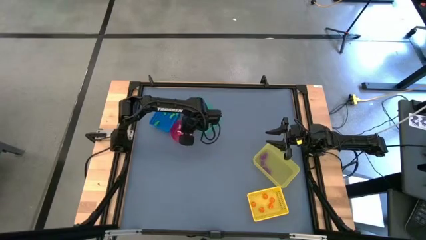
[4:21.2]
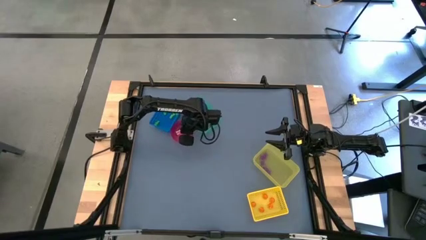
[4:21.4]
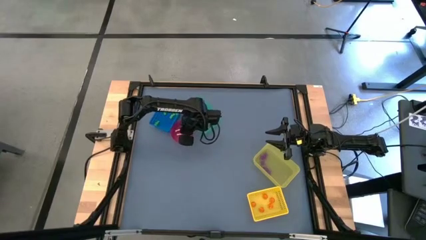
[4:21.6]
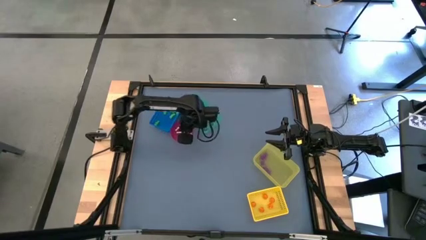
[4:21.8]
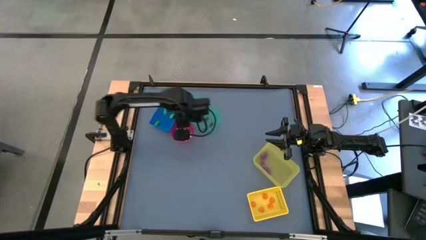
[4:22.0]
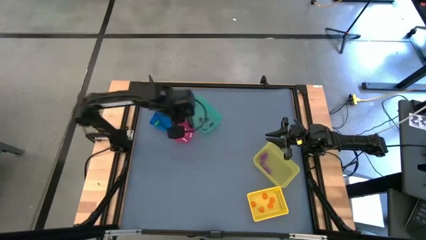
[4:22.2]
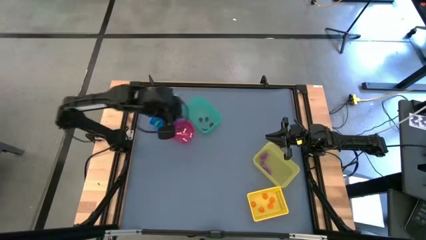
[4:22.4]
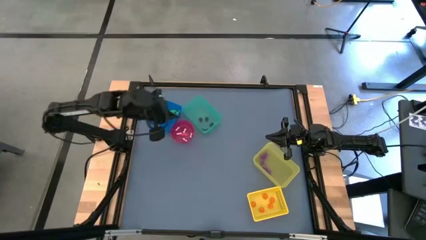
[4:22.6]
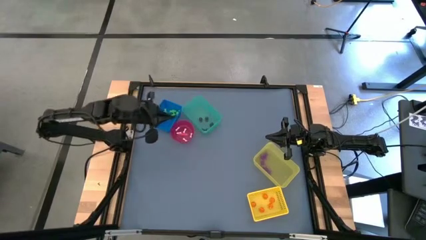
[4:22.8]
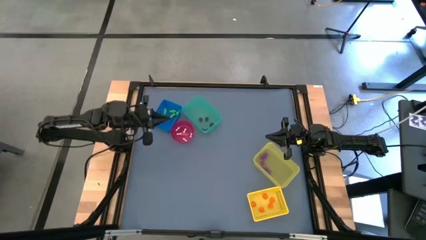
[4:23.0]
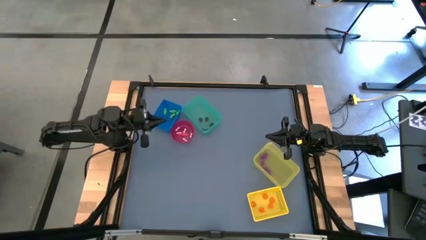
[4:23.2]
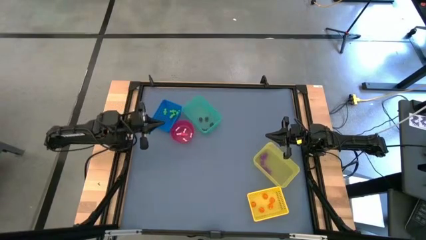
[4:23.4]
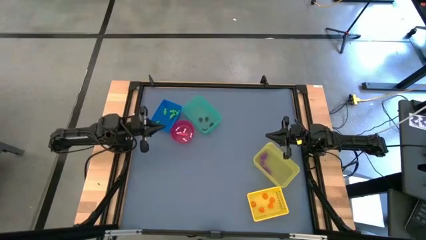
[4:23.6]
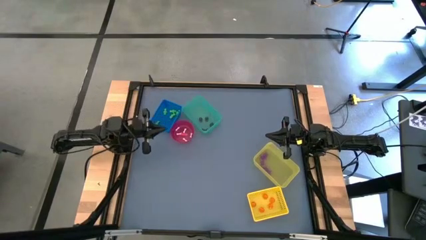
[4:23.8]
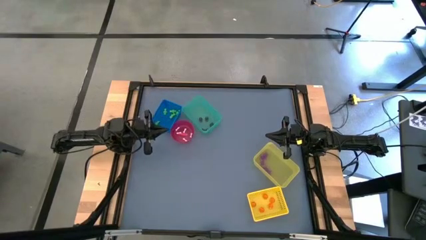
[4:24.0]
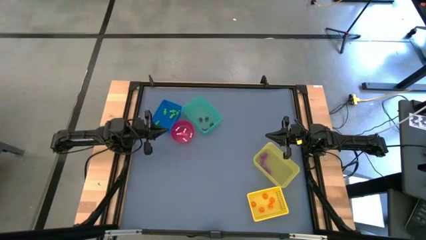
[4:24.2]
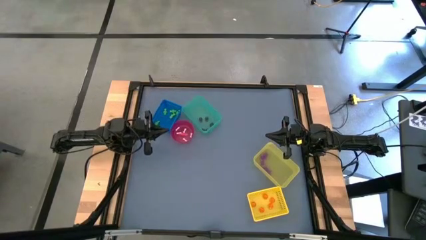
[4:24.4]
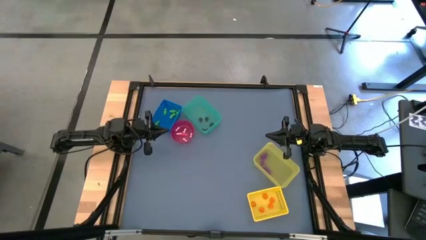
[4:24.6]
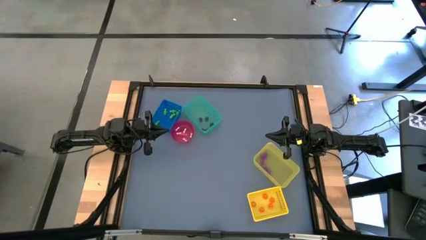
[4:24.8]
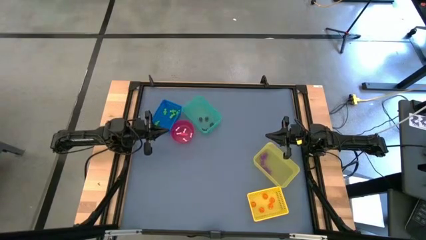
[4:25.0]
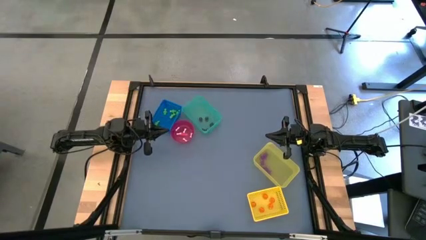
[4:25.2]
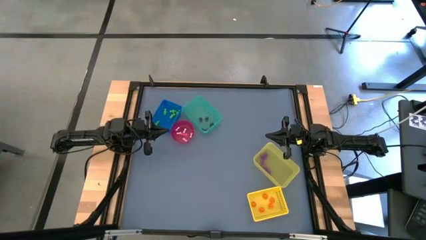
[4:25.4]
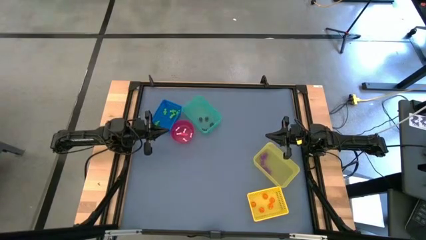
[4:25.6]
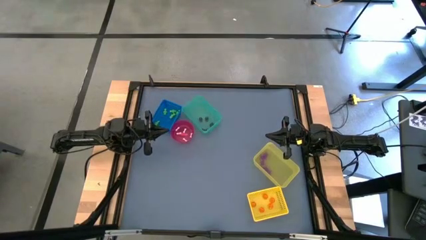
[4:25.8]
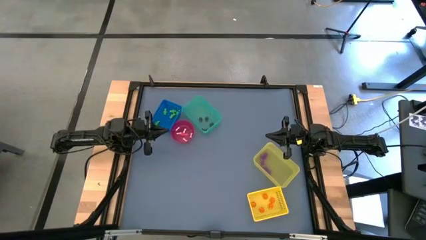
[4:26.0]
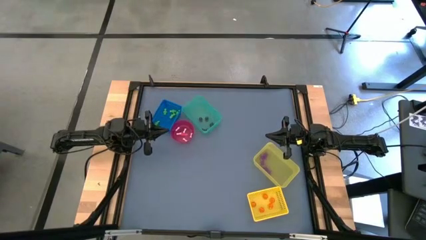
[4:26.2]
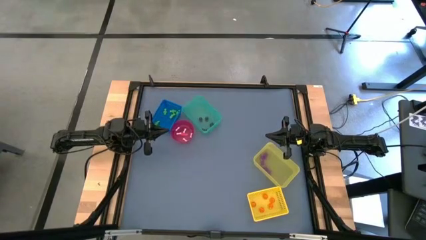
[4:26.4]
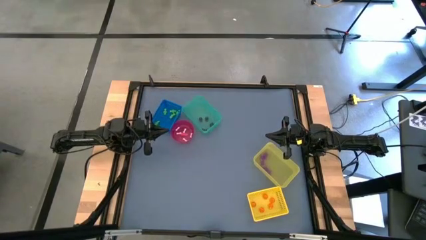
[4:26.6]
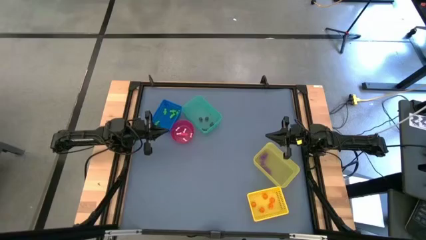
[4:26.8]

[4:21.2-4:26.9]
Task: Sort Halloween decoration
Return to Home Position

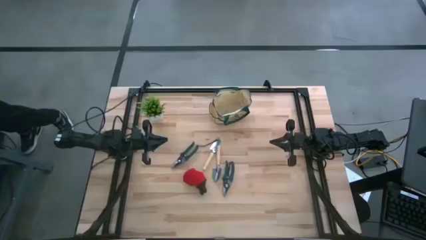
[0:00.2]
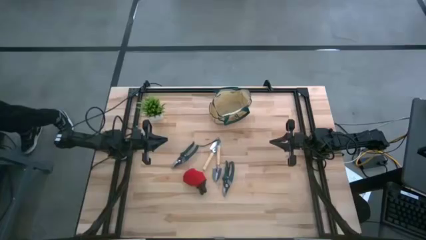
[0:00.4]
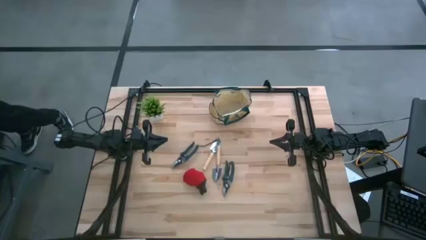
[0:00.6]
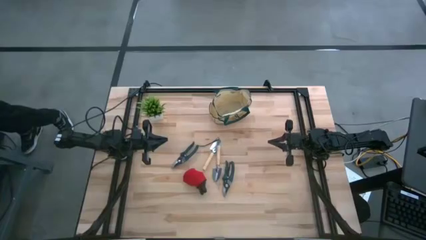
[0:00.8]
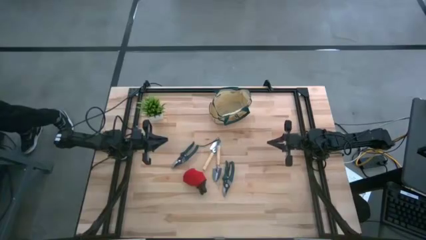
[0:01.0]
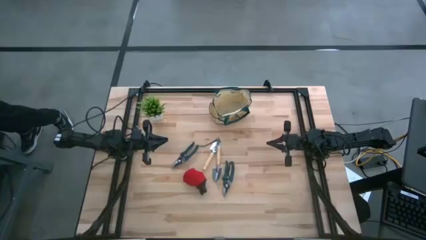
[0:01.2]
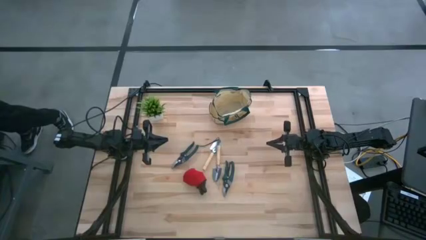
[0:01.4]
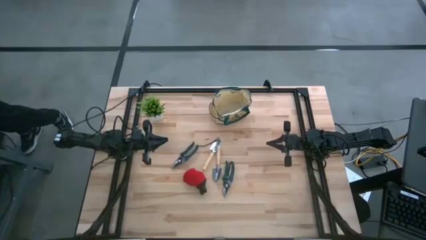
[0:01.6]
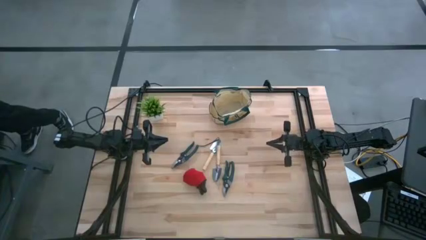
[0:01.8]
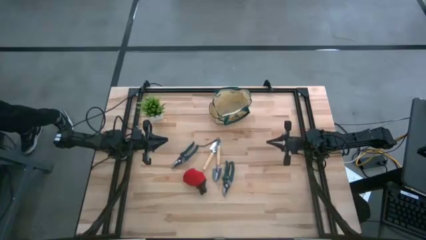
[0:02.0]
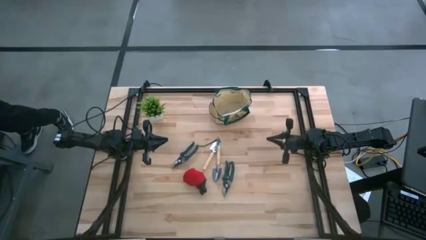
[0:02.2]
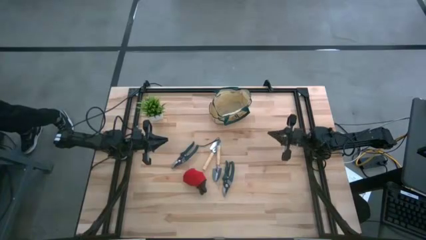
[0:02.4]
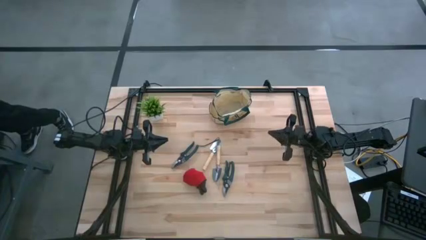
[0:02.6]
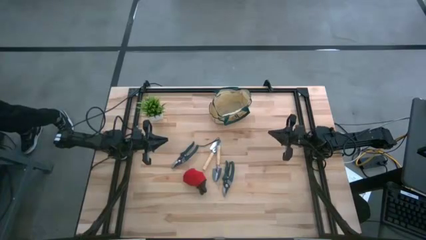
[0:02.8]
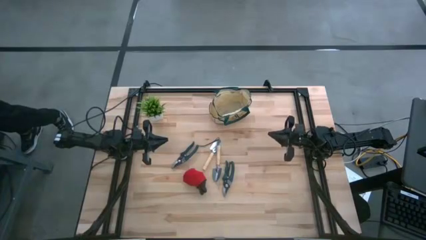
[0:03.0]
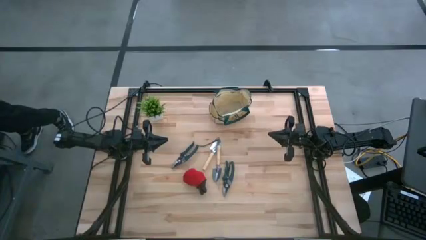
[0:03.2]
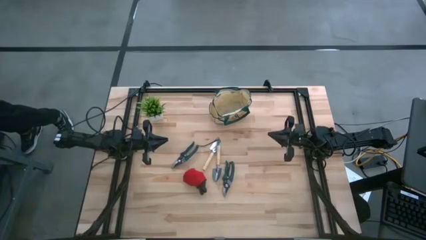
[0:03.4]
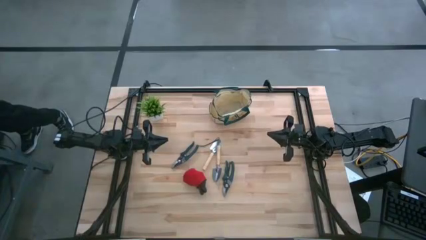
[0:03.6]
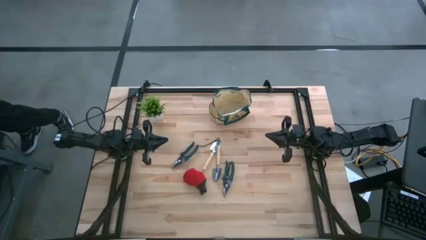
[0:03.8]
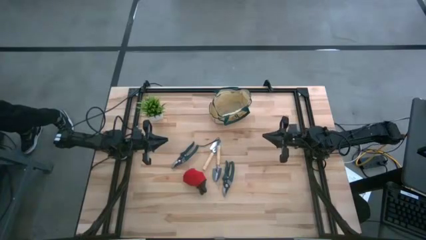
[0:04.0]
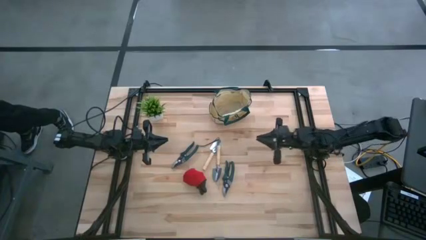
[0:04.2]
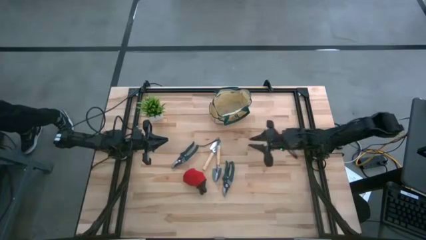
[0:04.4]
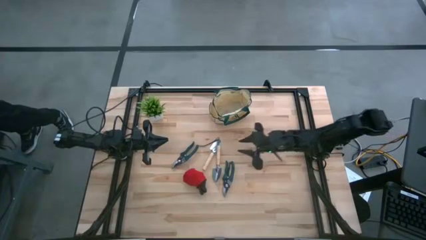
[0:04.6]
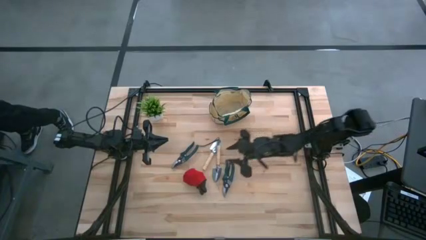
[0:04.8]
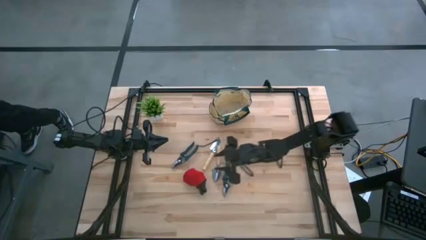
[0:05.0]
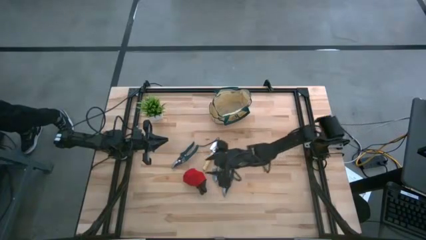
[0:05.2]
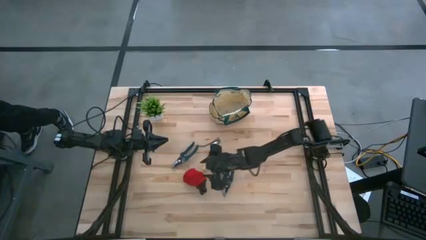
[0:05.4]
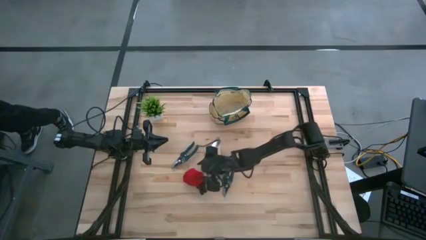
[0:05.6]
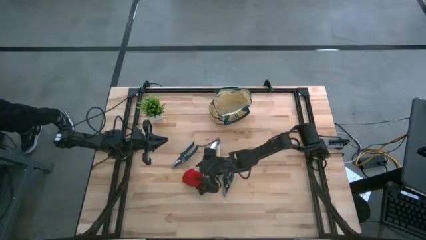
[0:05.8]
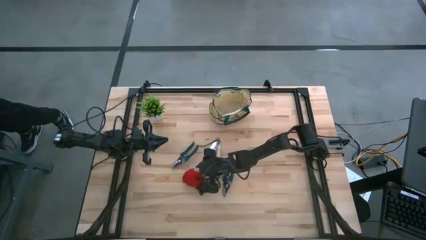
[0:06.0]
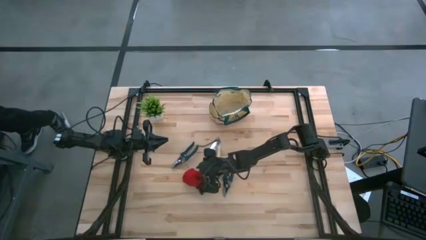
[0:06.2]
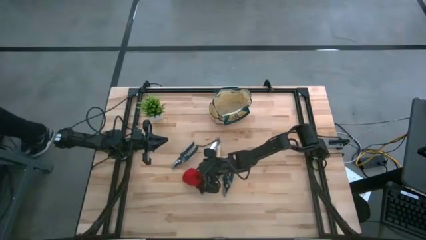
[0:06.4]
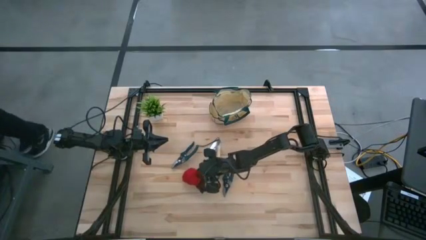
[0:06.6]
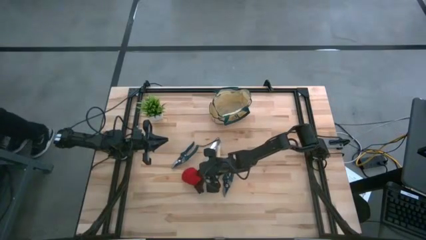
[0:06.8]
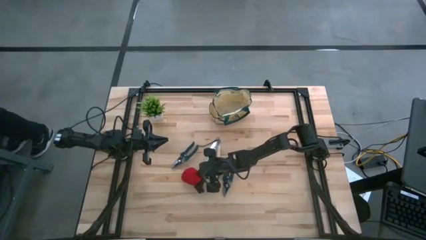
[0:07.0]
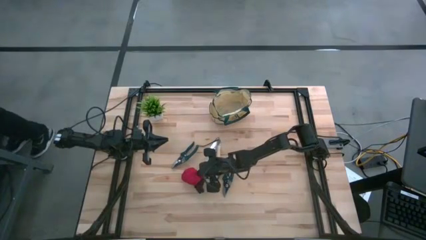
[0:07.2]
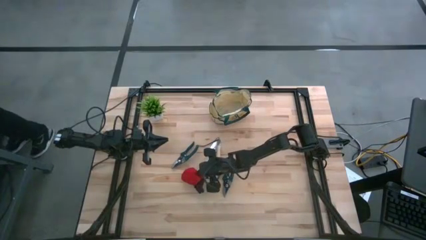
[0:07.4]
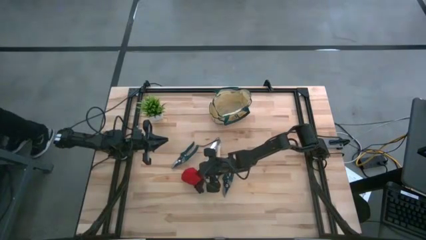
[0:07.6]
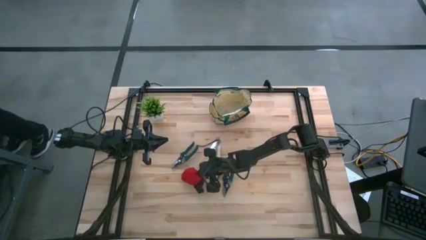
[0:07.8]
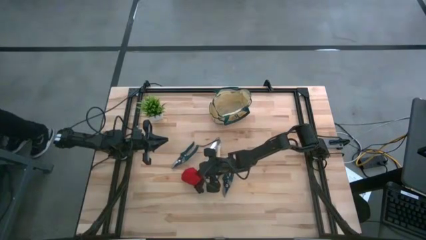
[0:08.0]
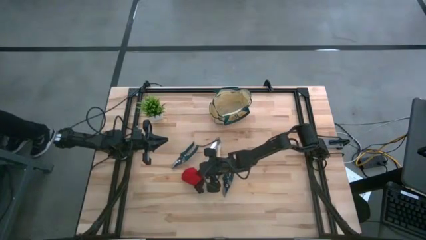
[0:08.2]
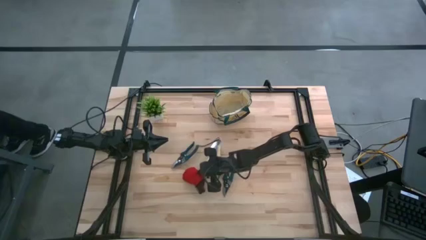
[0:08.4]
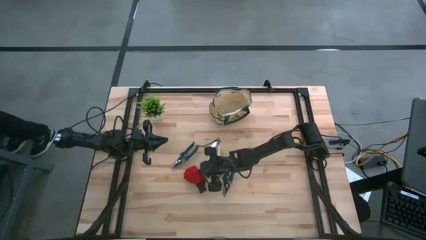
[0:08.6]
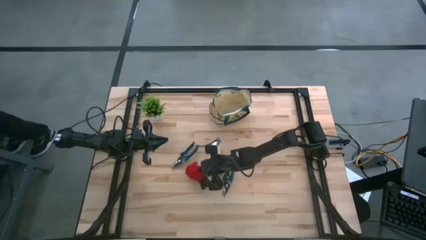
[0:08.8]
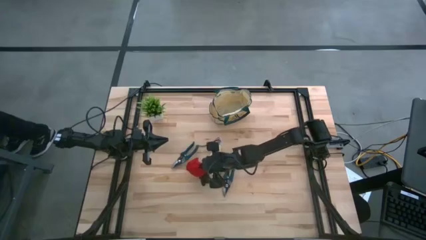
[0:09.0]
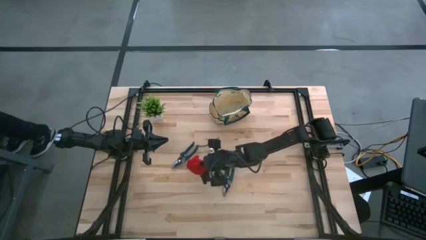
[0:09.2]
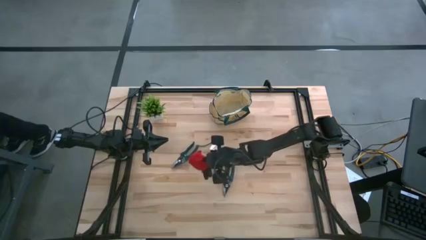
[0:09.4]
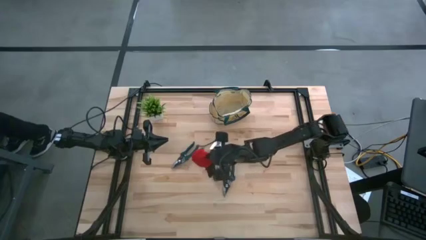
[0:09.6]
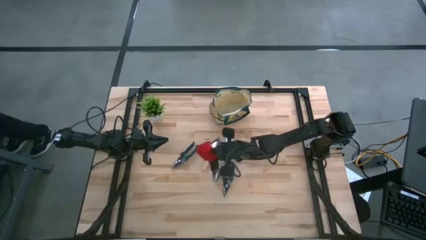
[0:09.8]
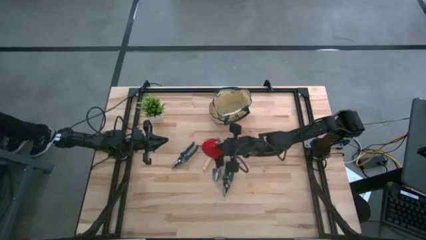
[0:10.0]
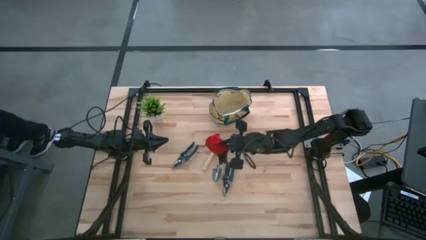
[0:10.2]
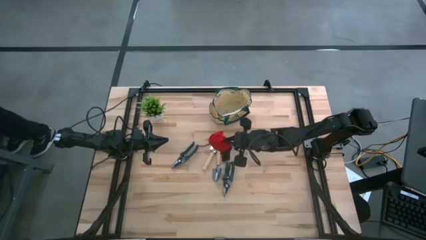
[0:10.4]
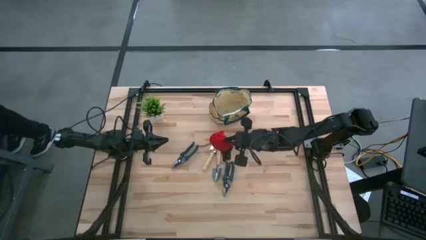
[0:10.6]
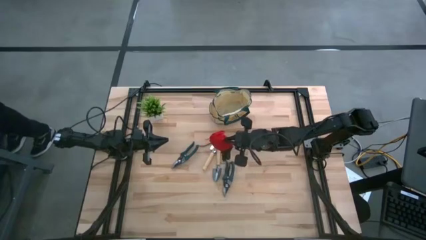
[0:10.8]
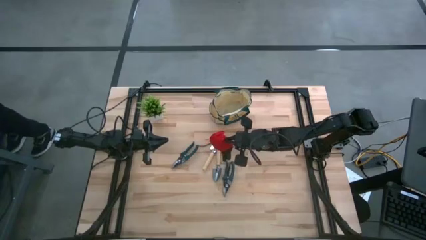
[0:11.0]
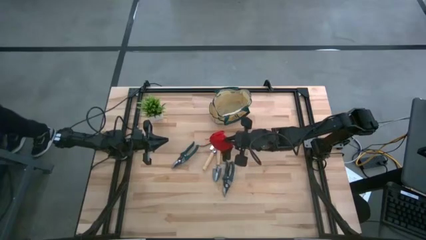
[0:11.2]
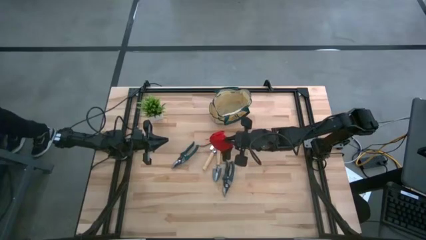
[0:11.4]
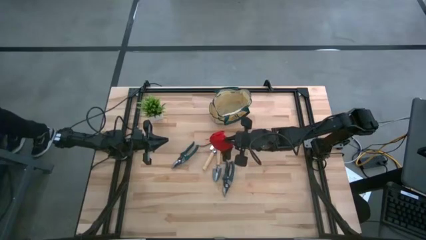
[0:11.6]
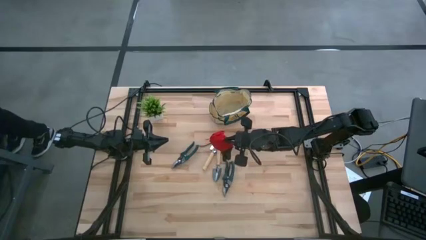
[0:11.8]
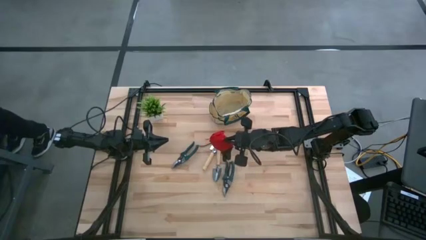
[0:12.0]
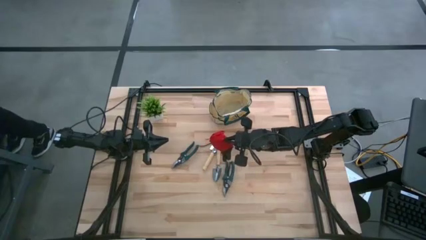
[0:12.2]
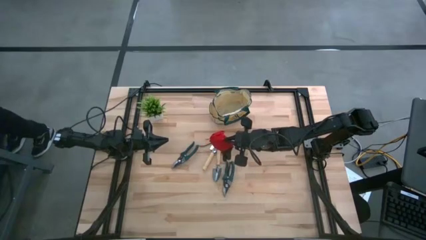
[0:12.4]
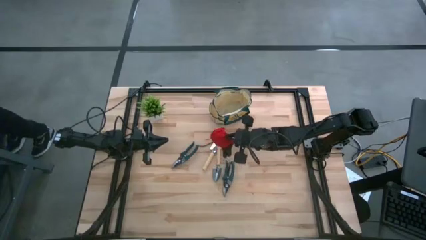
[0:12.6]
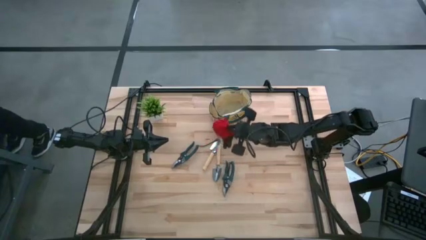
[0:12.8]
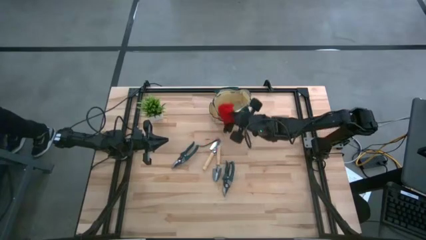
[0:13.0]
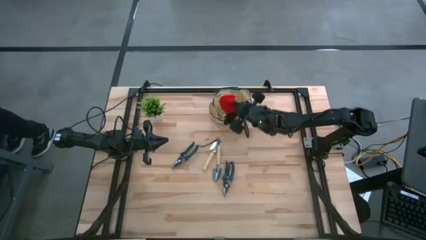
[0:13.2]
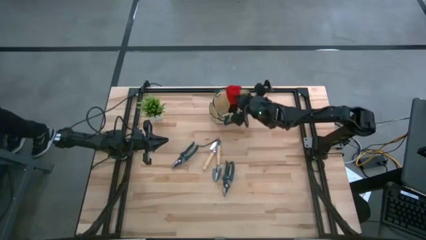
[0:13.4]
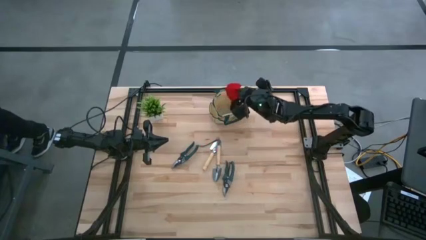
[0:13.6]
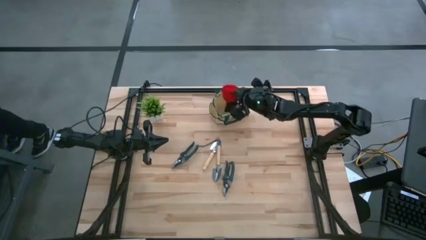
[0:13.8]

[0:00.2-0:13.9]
Task: Pick & Place Garden tools in Gardening bag
Put the red gloves into the bag
